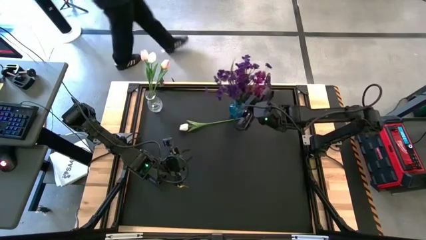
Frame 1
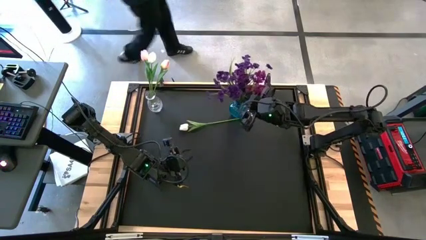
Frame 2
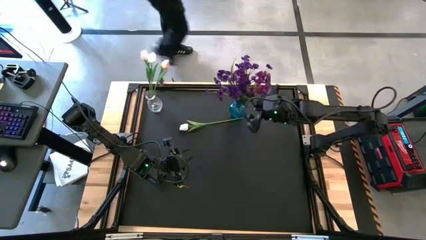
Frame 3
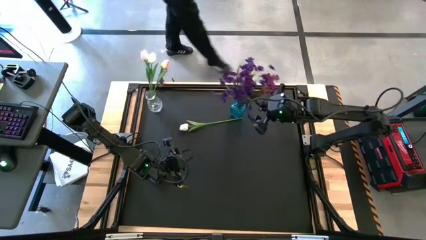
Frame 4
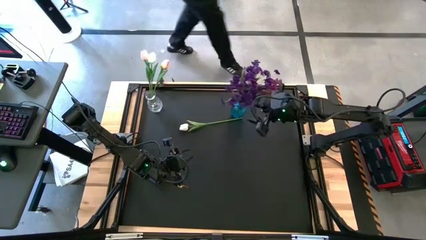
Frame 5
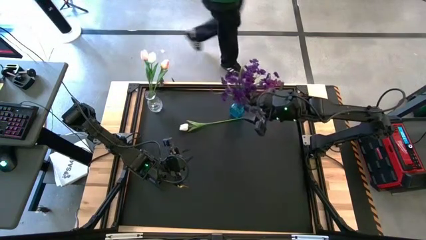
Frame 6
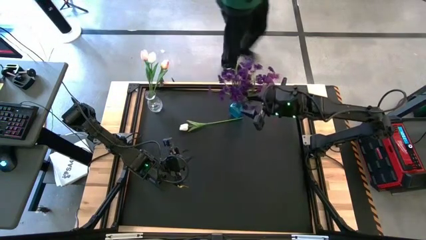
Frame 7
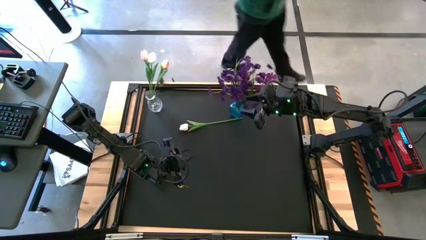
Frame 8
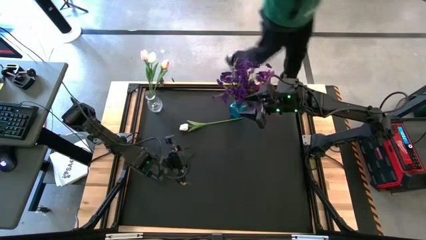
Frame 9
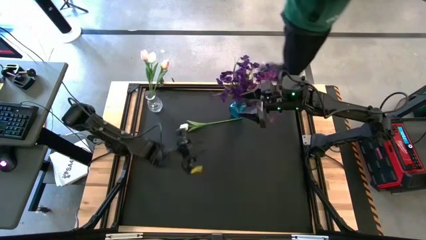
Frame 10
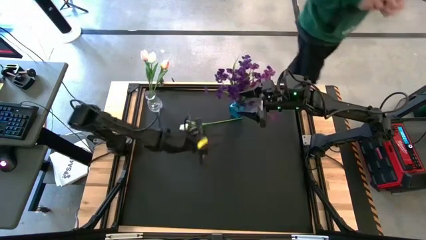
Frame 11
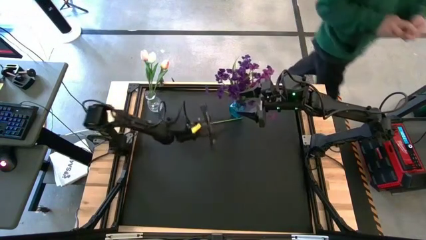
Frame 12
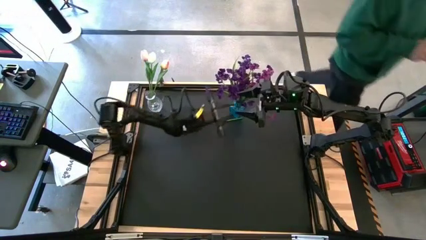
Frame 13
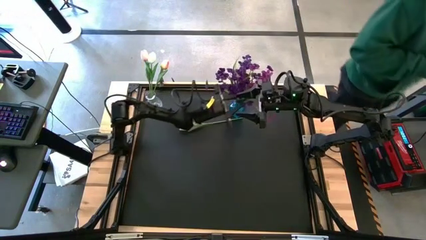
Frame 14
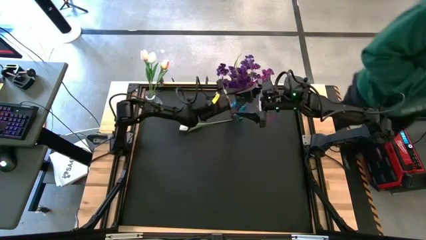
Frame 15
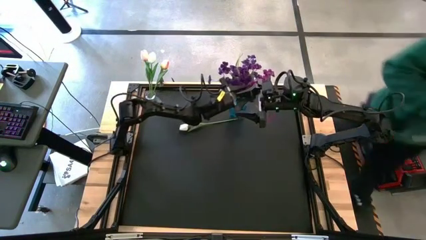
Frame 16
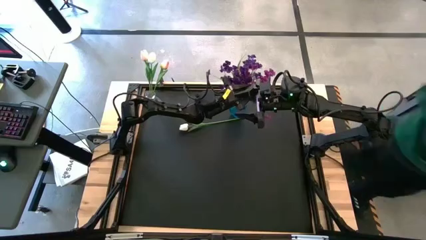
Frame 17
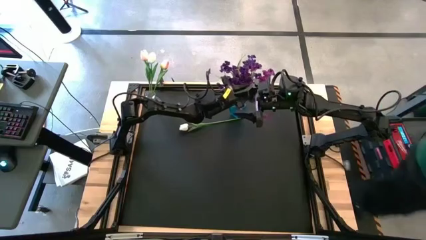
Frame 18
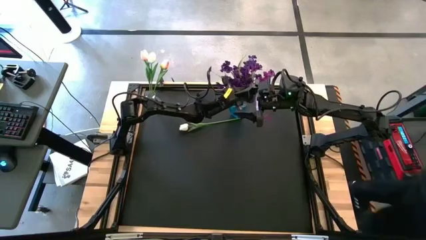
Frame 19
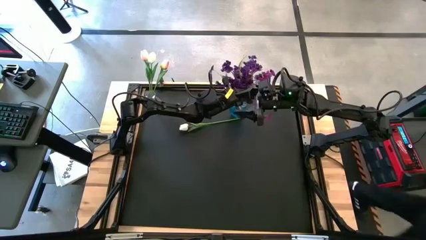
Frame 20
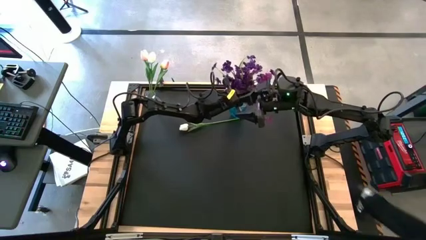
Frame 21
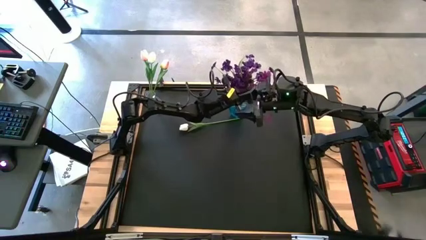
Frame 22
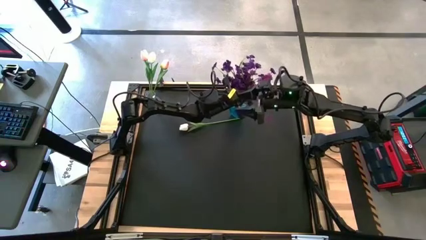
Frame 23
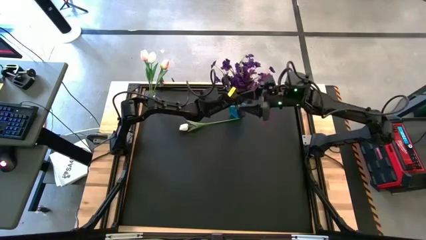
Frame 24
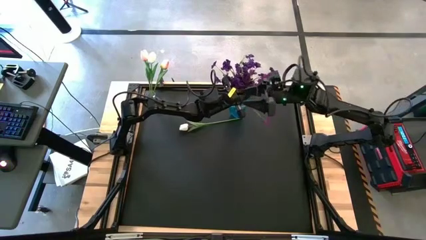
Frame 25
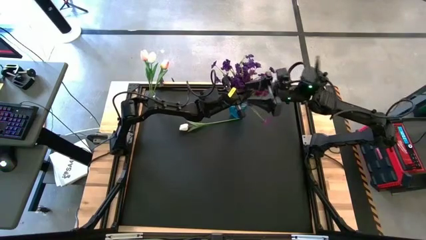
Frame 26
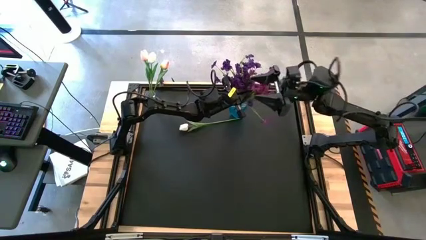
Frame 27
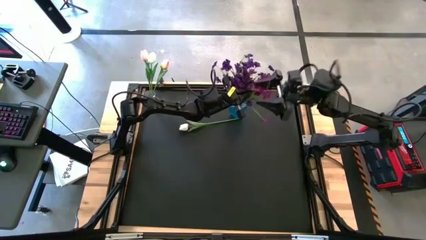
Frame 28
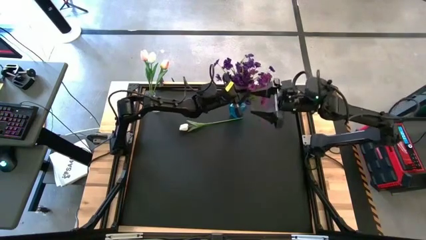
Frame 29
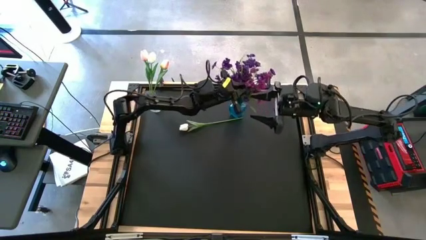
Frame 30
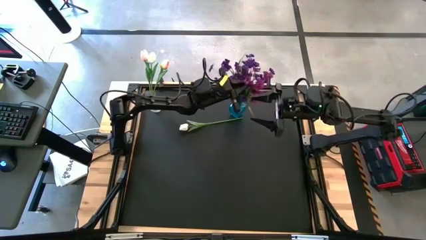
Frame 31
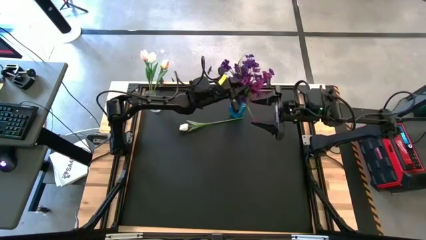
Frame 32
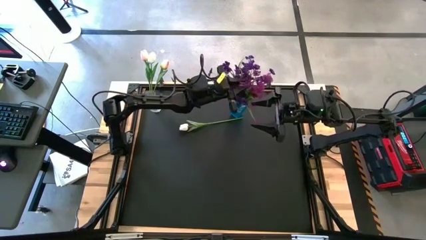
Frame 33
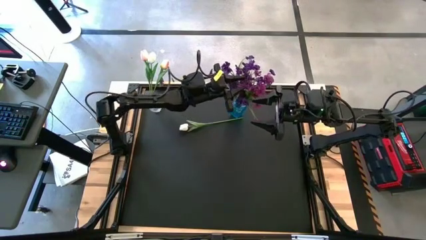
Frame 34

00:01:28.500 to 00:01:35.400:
Task: Sort flowers into vase by color
Adjust the violet flower

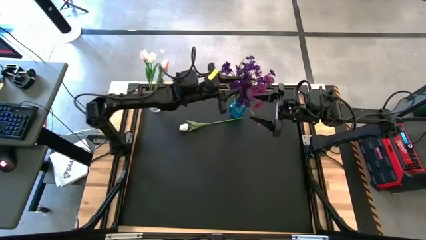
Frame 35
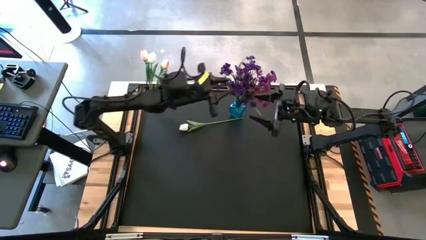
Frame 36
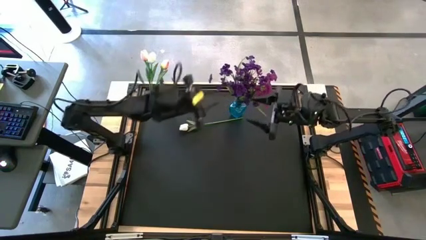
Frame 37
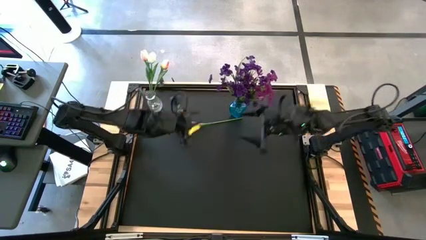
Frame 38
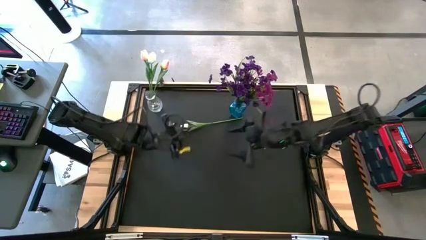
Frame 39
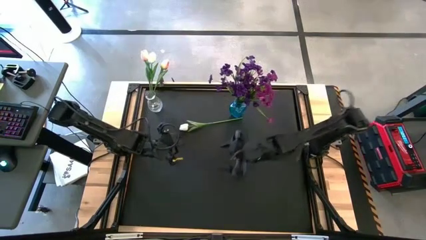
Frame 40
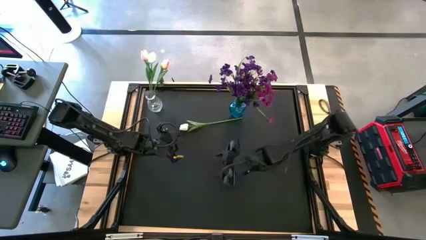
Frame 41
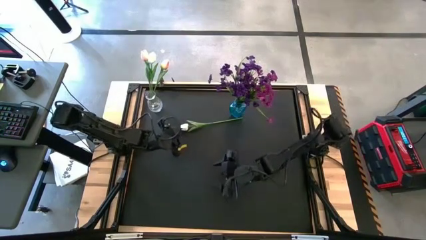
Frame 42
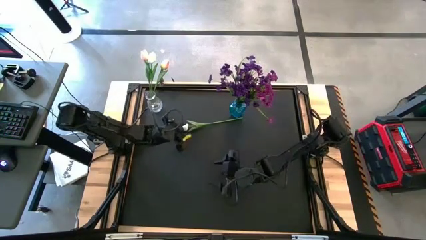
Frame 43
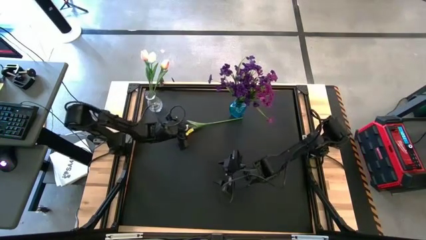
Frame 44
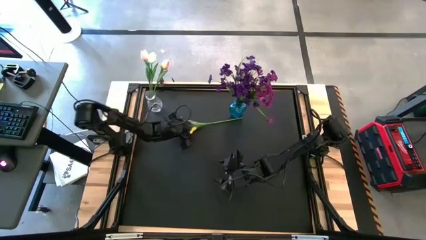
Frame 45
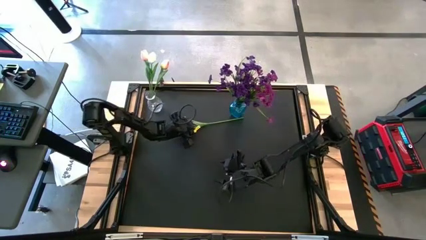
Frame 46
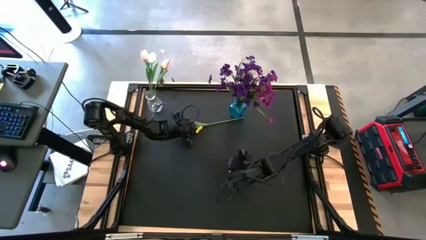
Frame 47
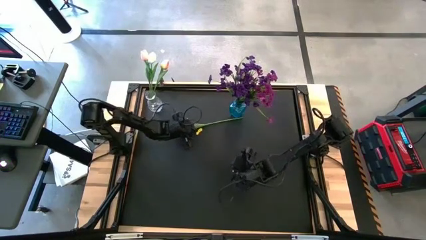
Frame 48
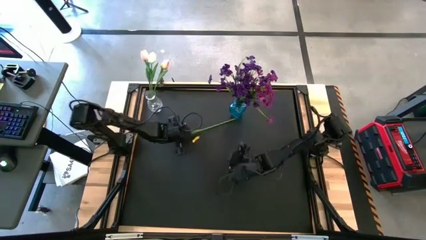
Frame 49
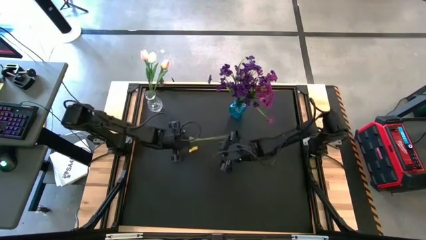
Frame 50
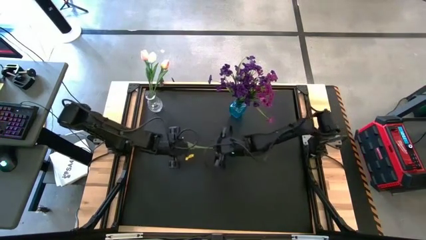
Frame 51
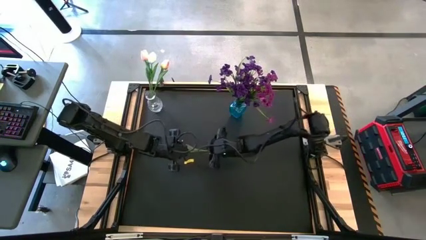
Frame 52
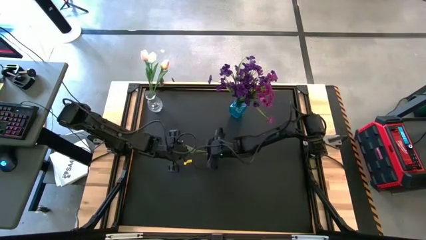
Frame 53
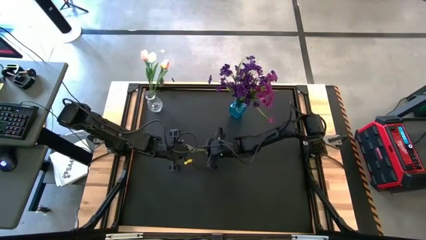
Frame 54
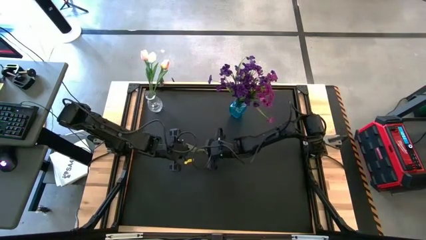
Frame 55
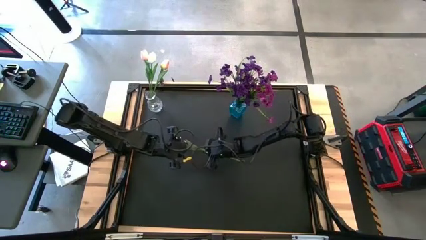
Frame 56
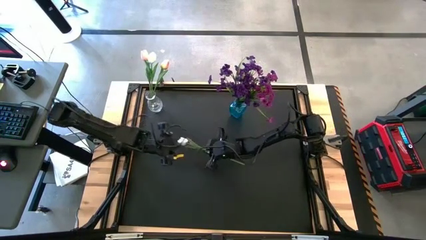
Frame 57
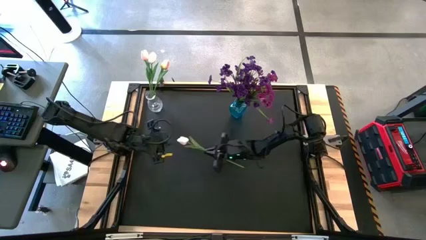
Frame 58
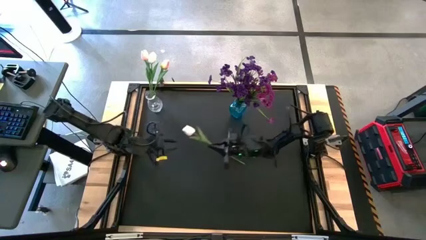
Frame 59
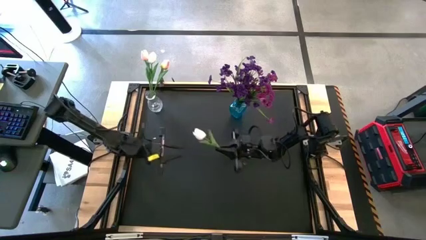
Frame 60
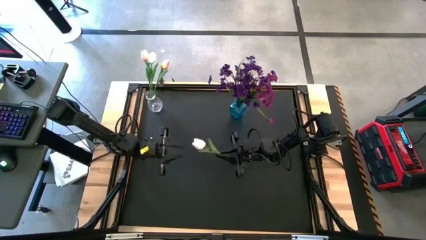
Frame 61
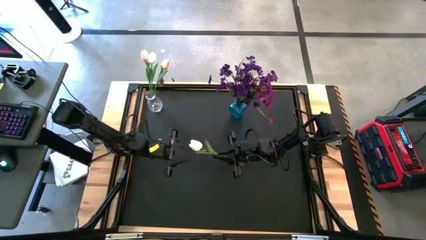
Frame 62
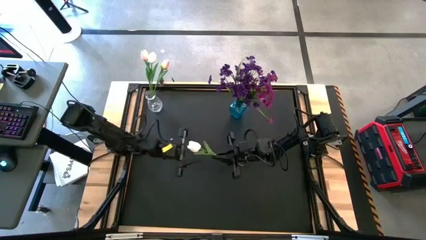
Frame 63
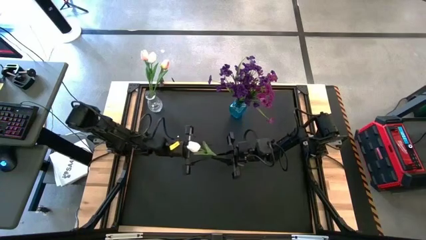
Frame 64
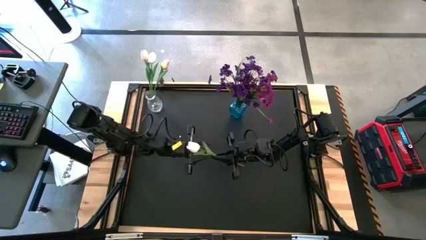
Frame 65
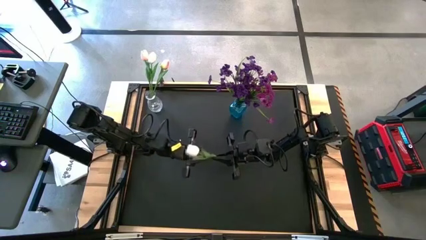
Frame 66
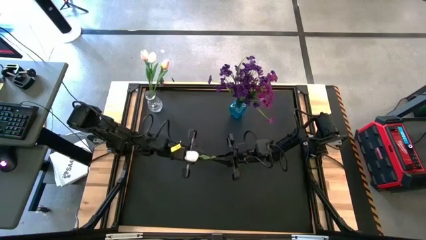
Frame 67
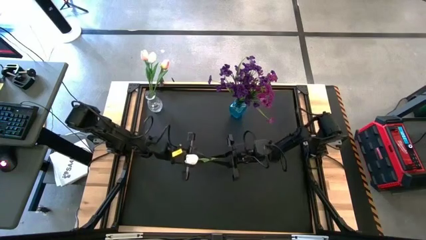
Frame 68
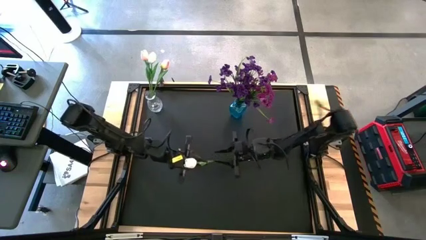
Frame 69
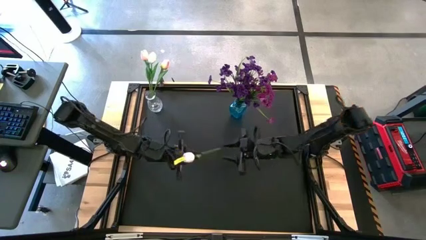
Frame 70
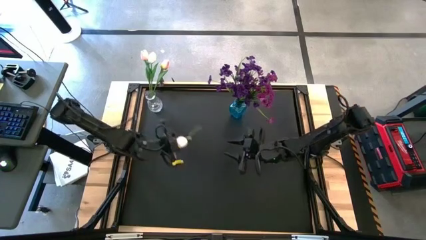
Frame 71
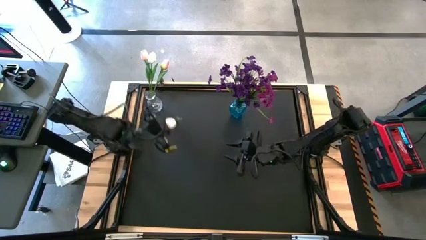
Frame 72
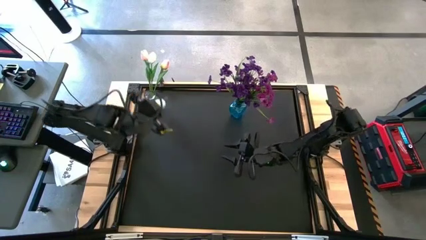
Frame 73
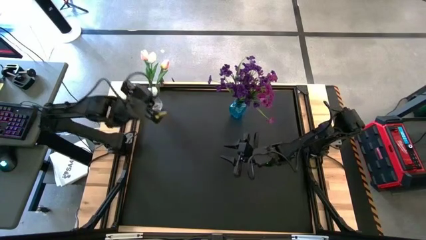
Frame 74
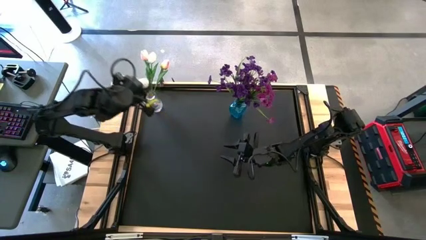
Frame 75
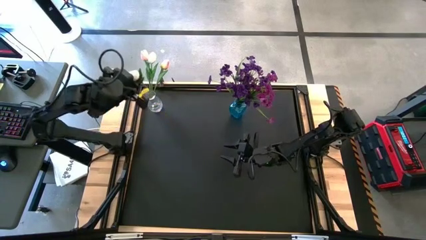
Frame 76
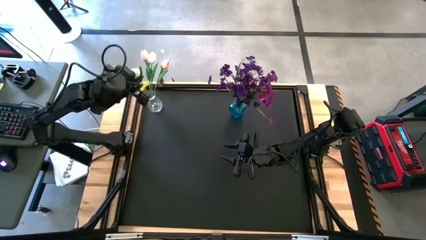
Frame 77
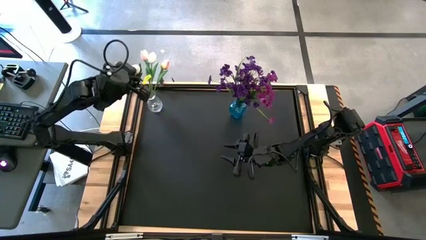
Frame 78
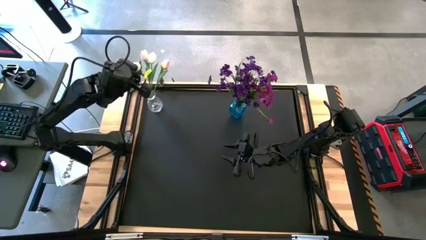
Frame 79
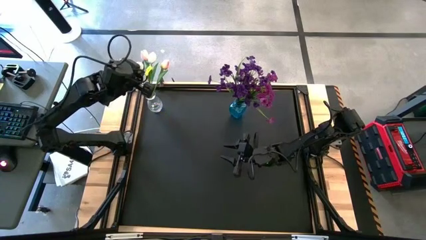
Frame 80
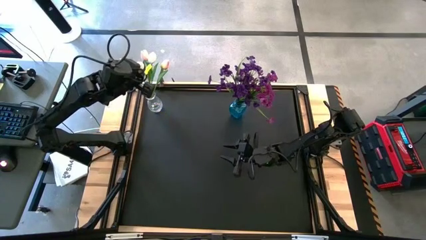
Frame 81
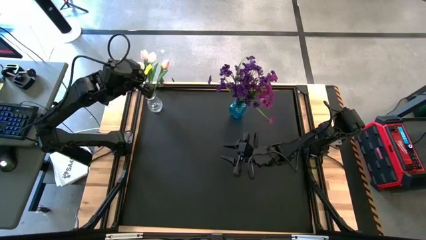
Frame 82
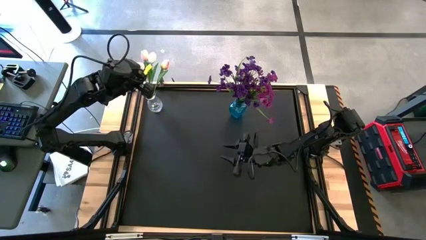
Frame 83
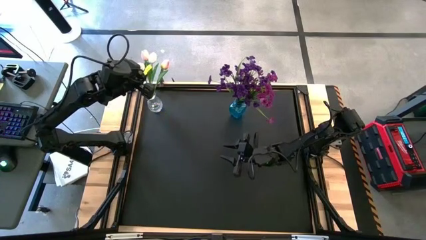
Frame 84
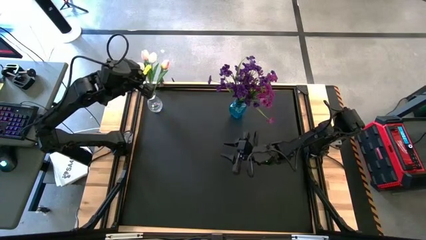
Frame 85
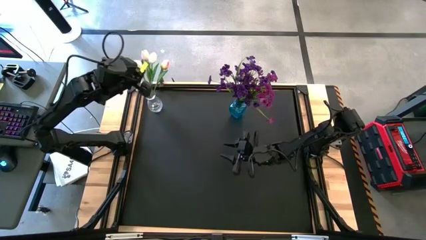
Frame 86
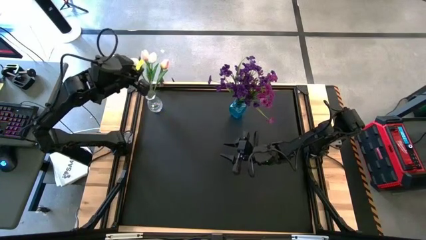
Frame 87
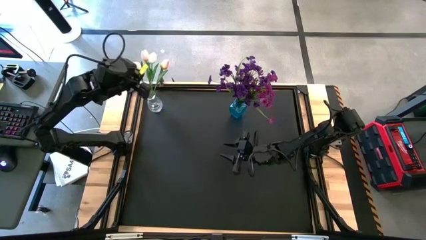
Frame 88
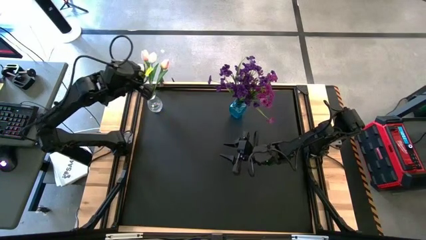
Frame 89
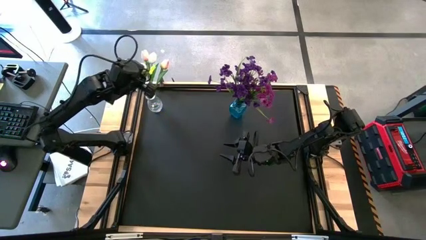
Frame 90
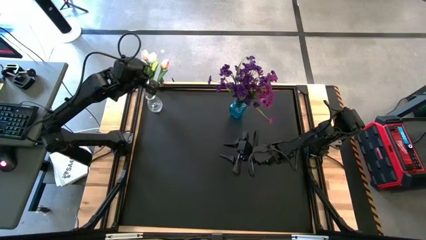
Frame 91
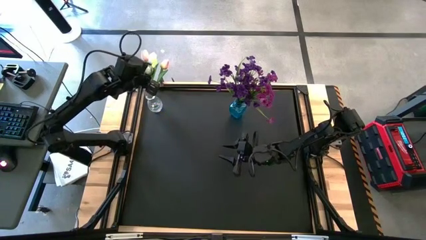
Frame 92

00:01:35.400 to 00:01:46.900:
Put the white tulip into the transparent vase
